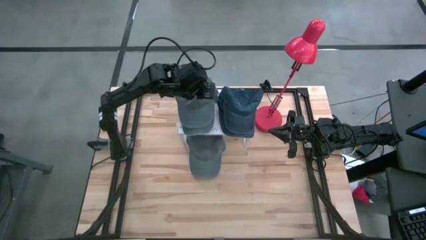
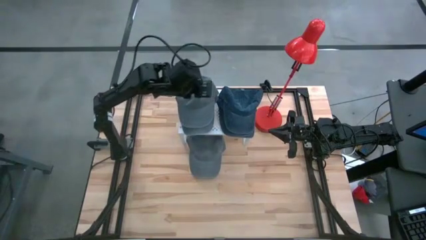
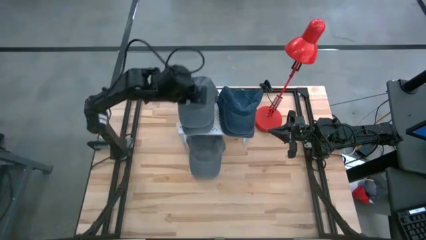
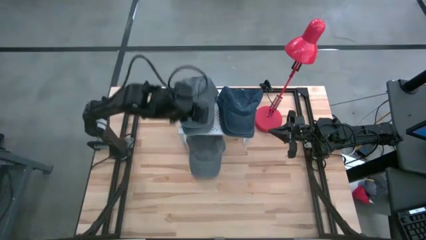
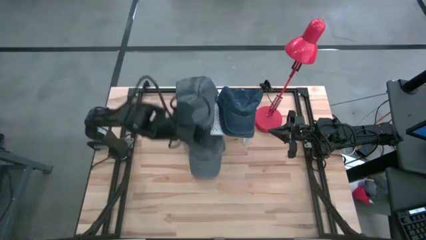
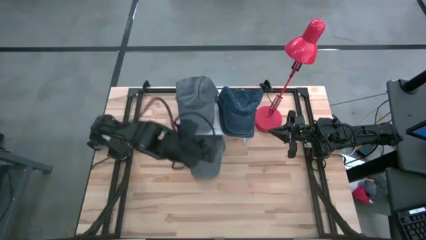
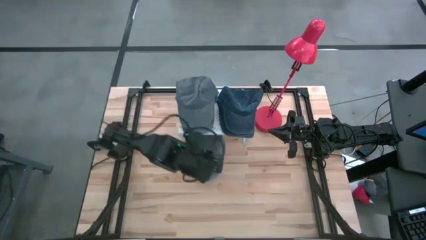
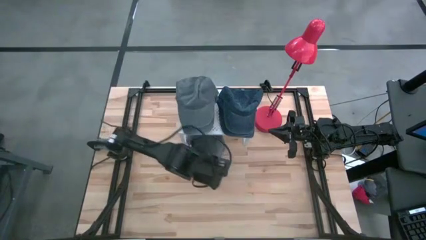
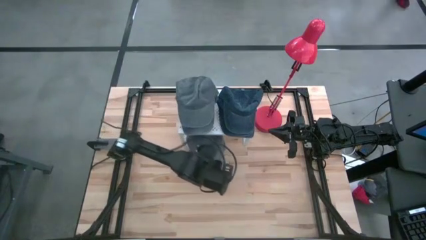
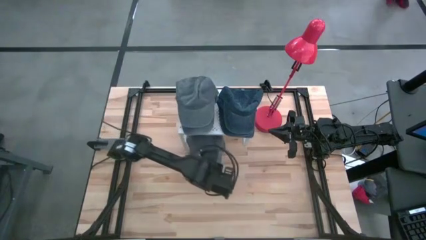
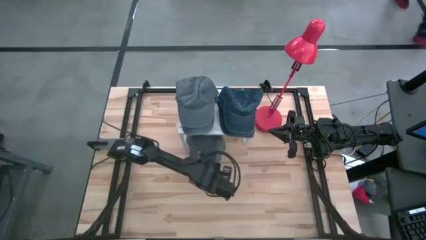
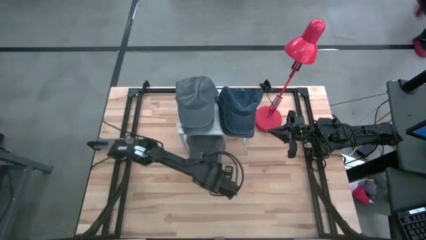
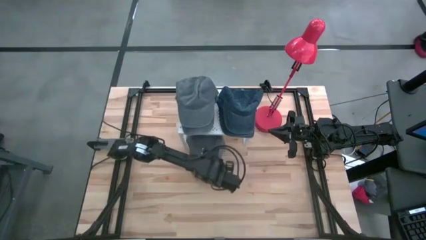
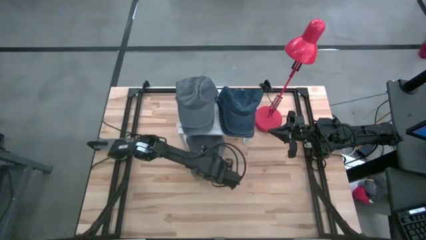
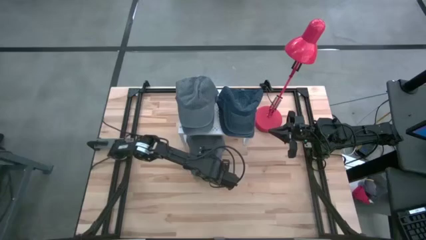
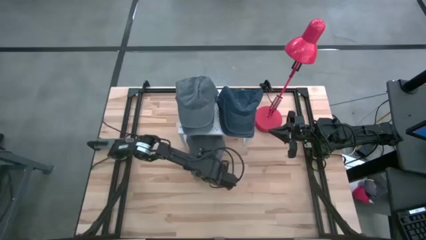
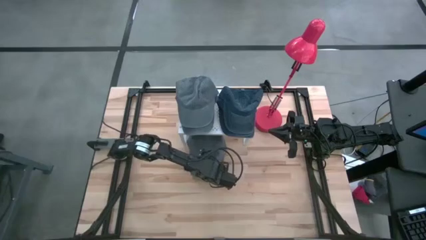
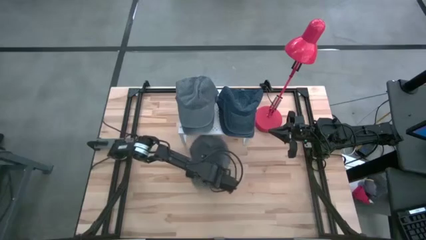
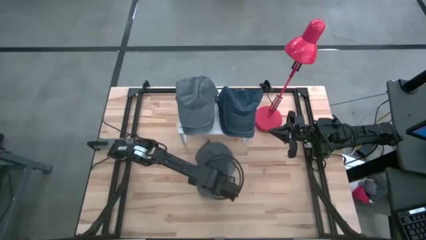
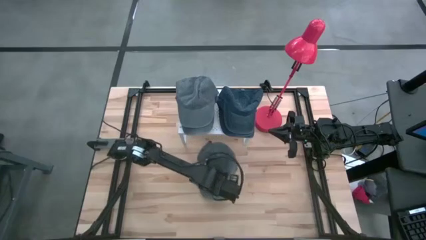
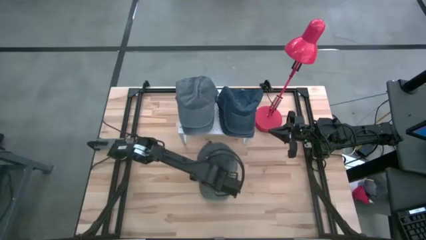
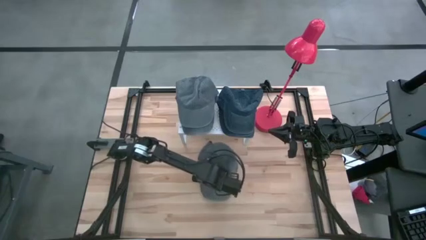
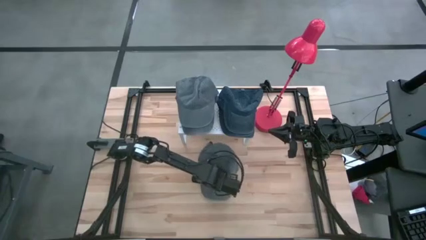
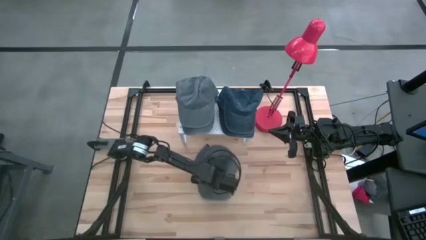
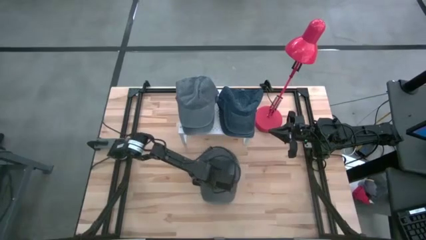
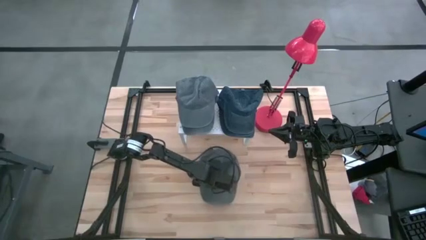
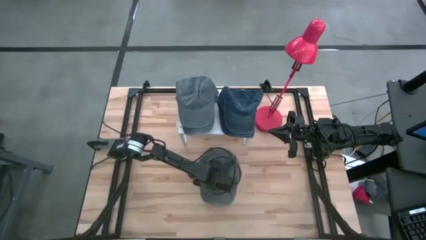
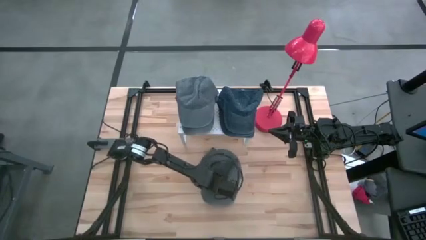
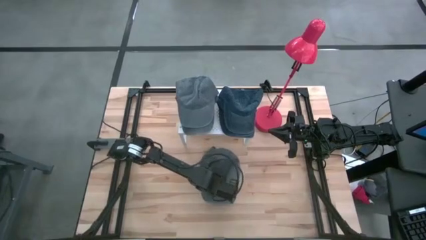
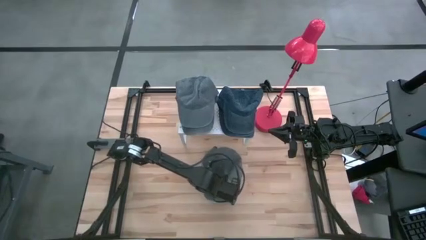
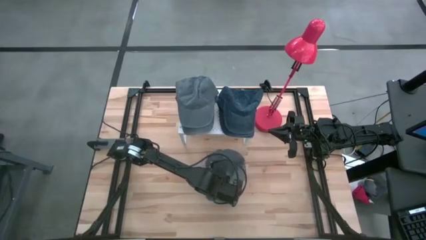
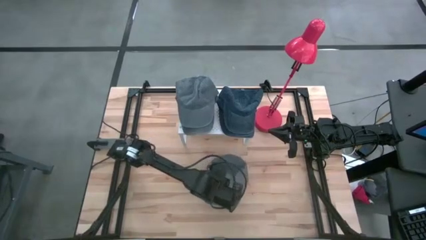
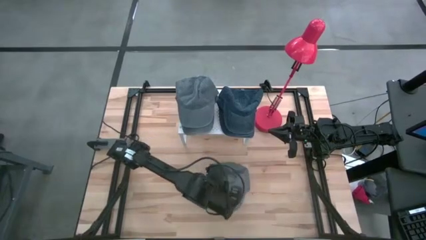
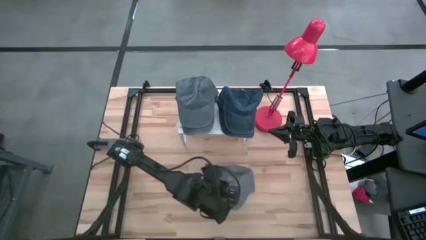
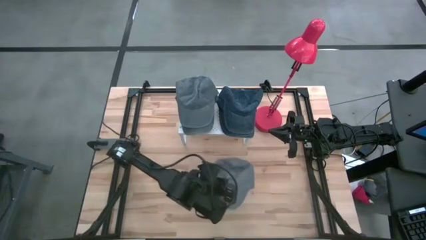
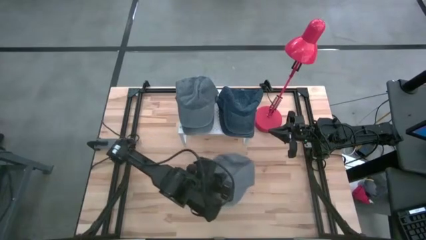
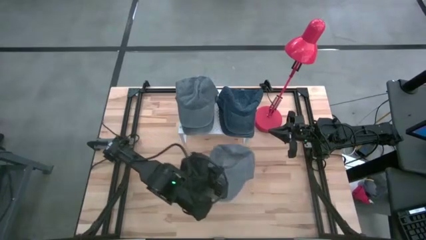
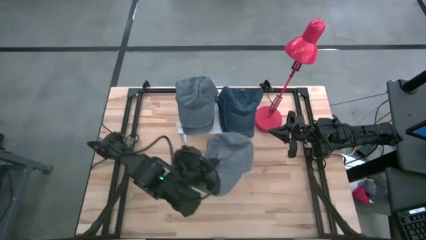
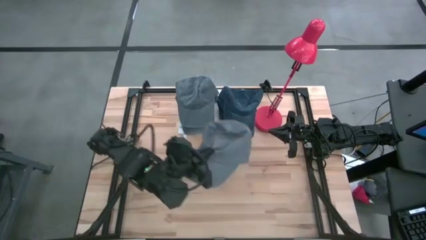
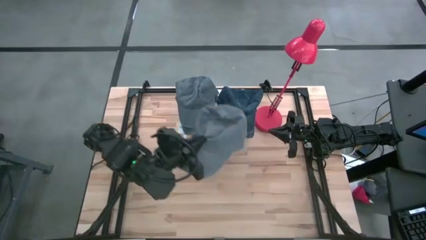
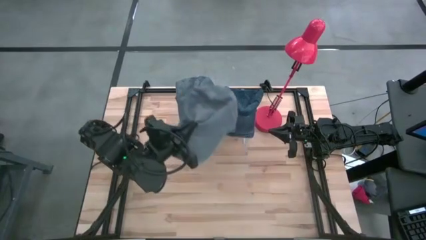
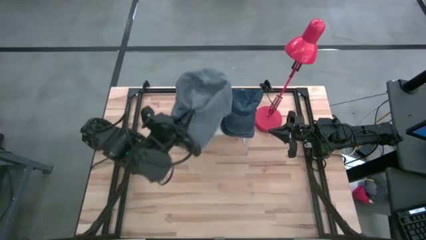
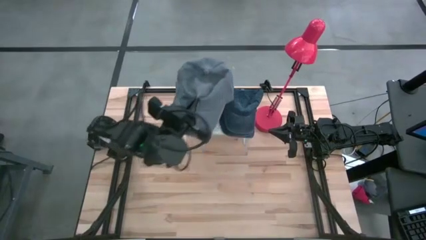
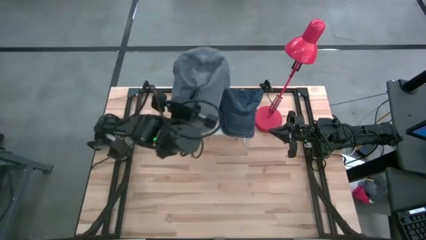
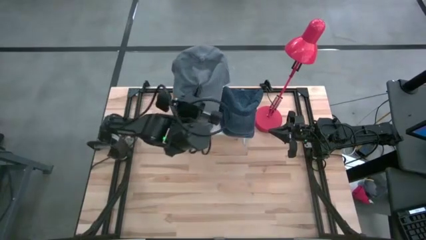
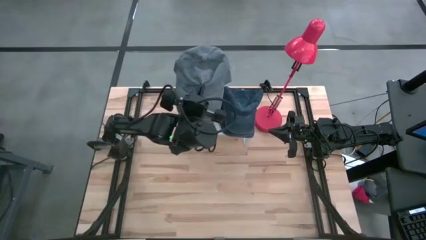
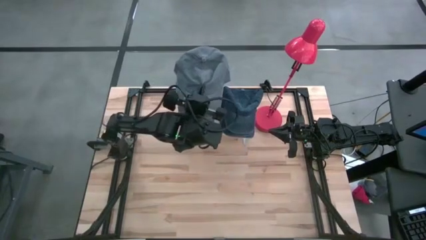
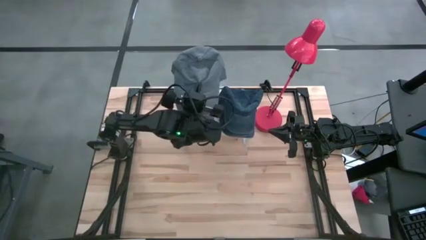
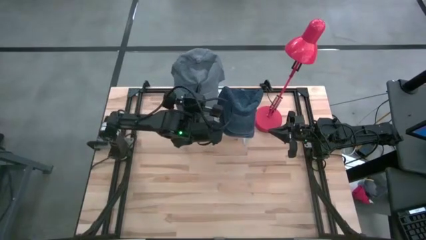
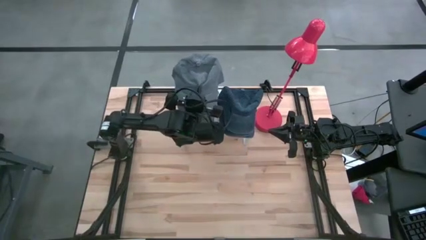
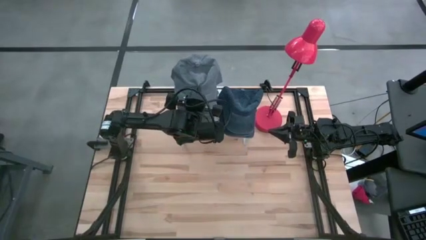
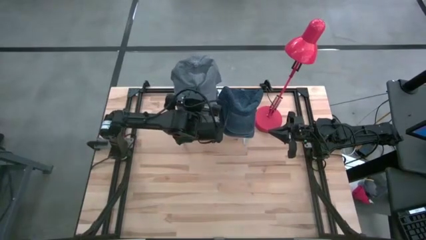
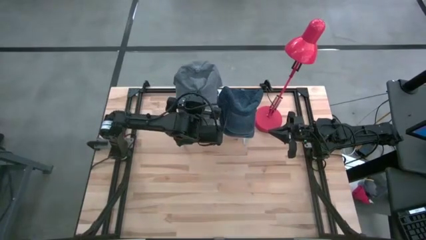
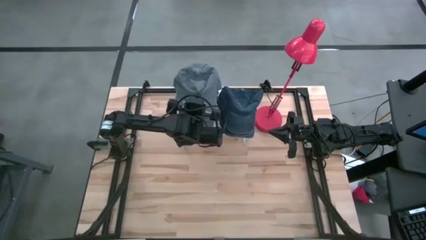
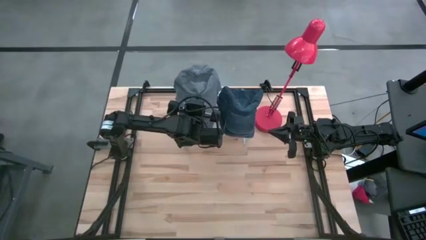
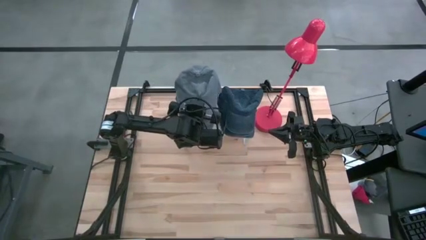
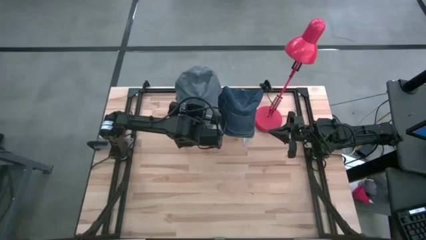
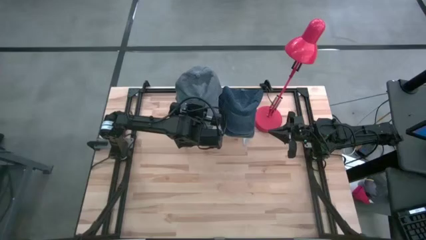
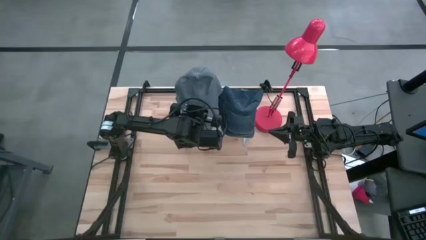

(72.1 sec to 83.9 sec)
Task: Pick & Place hat
Stack the gray cap on top of the gray cap on the shelf

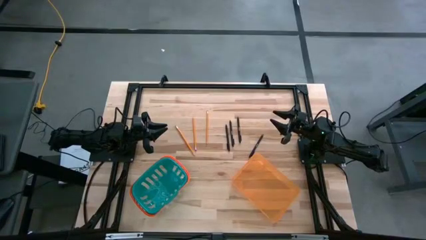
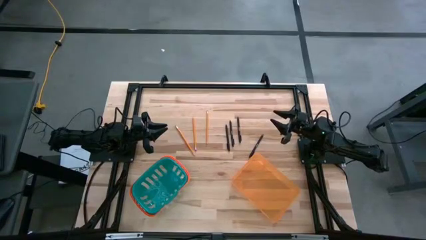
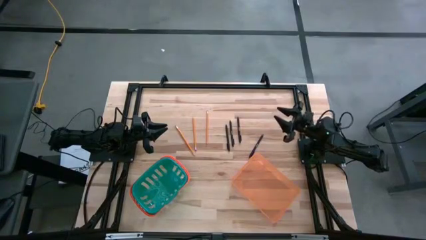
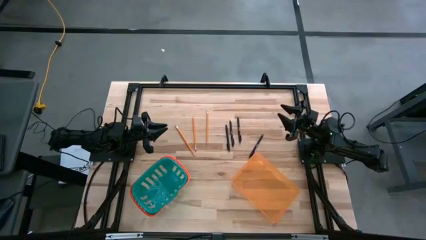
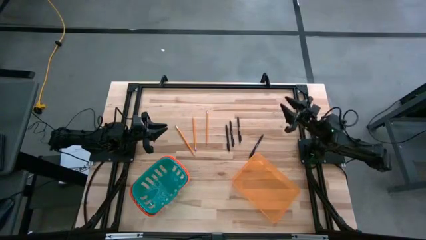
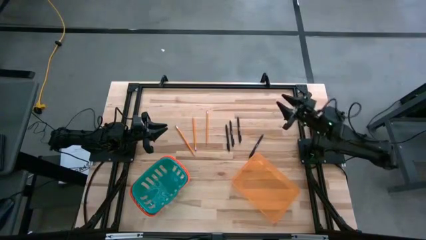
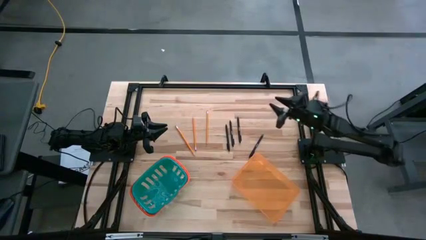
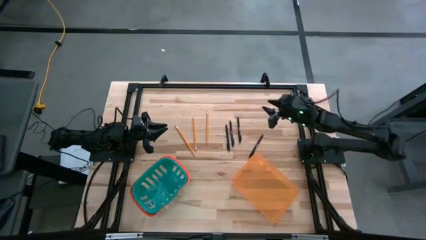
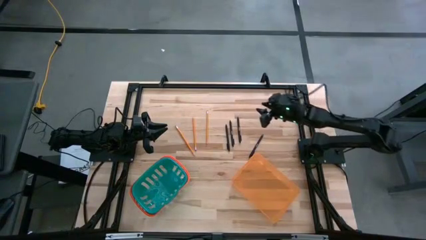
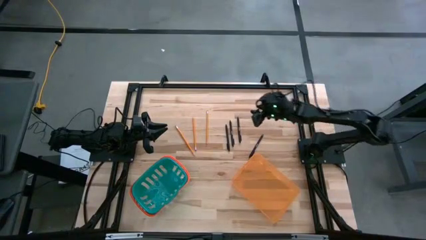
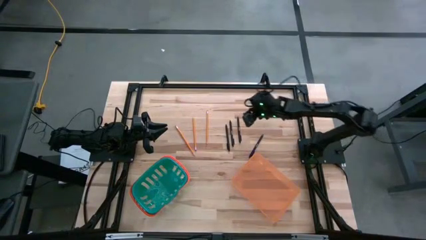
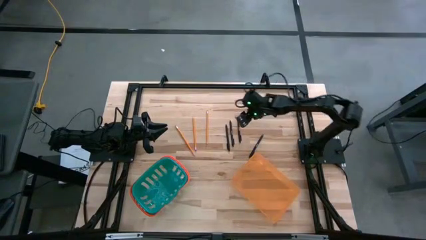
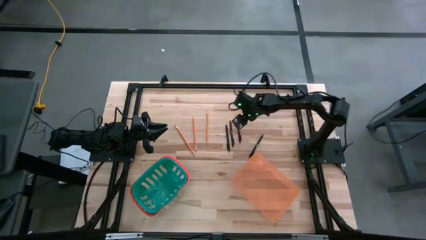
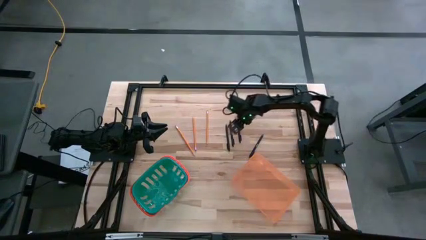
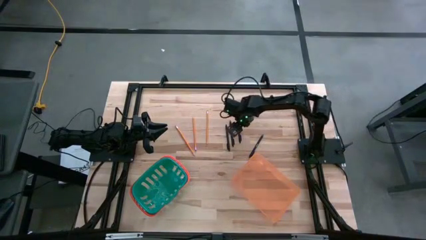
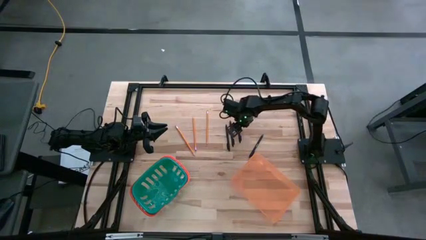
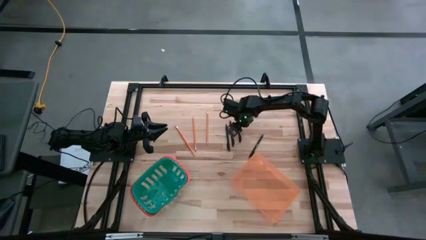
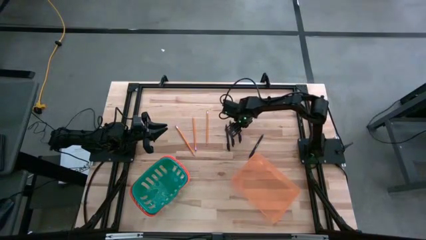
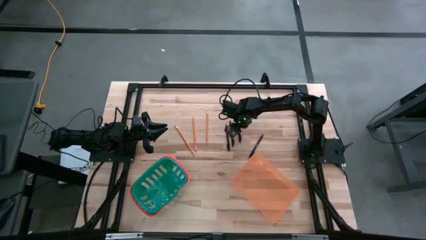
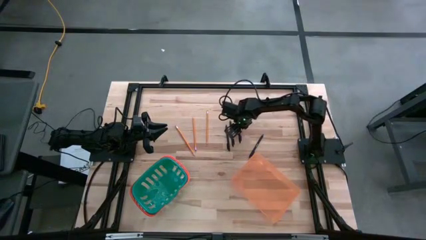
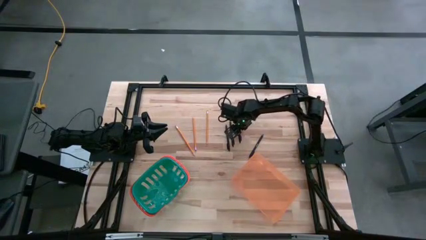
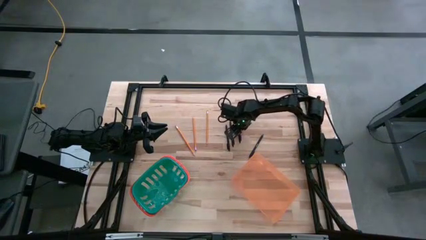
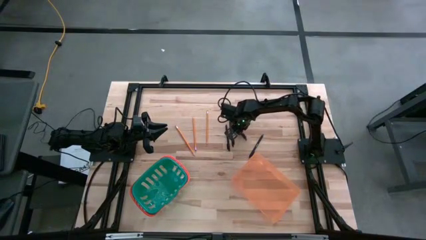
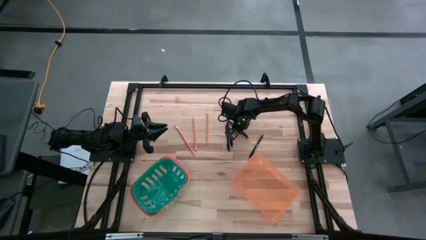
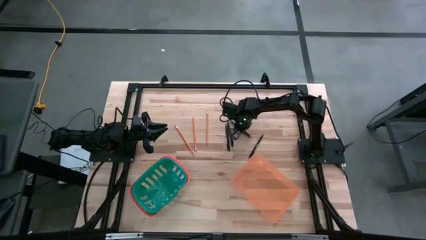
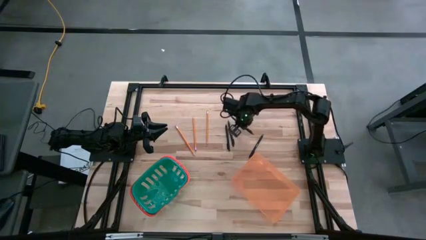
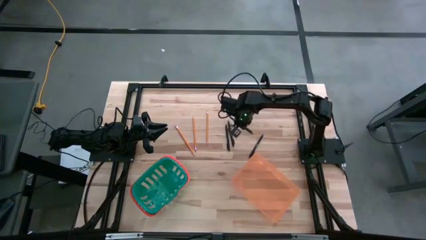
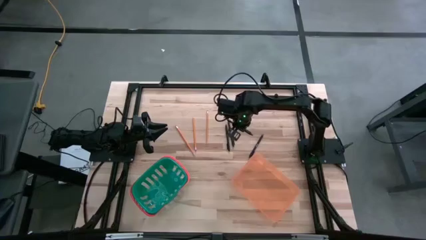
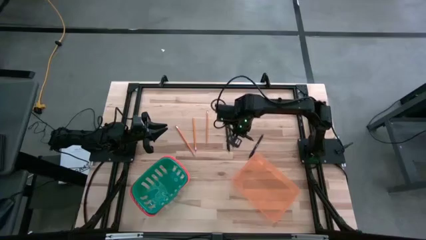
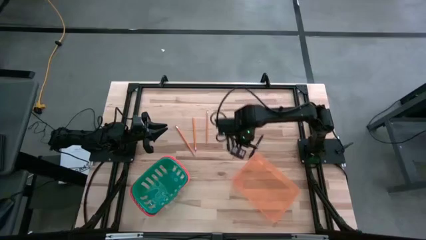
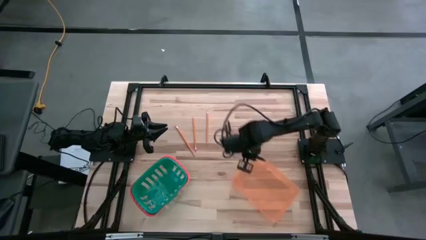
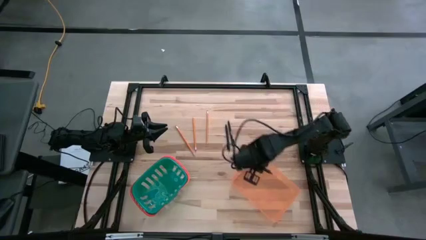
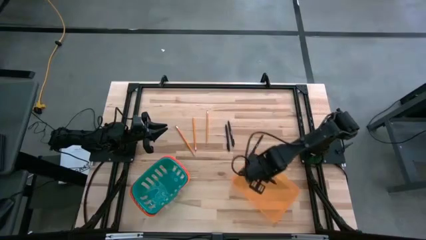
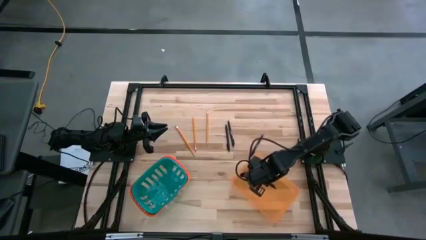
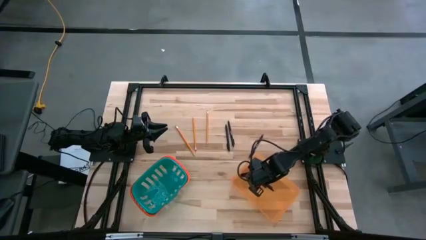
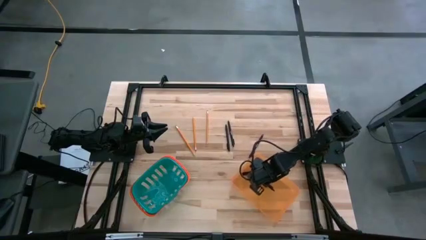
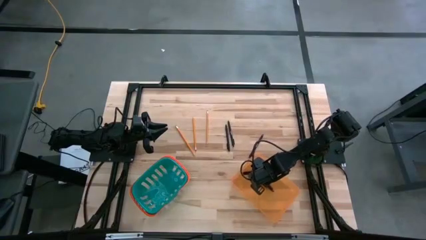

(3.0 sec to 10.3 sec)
Task: Sort pens & pencils
Put the black pen into the orange bin
